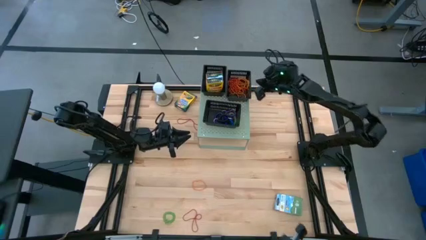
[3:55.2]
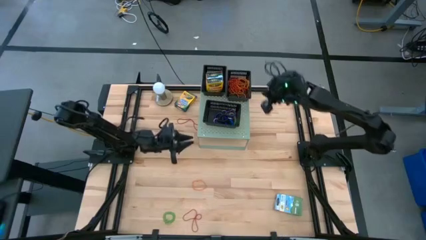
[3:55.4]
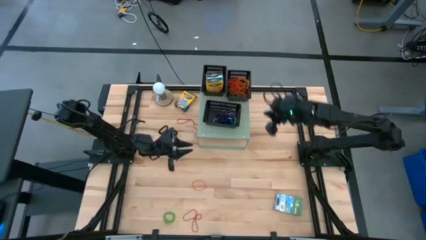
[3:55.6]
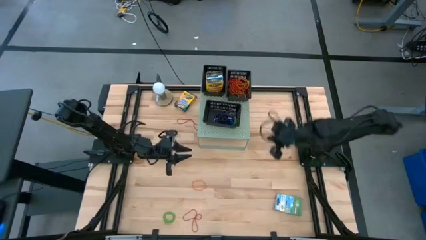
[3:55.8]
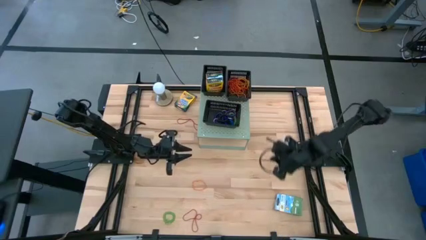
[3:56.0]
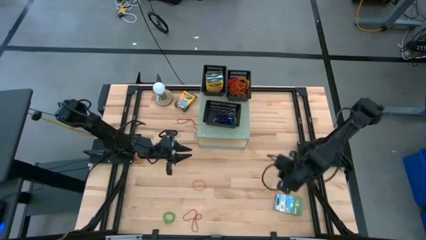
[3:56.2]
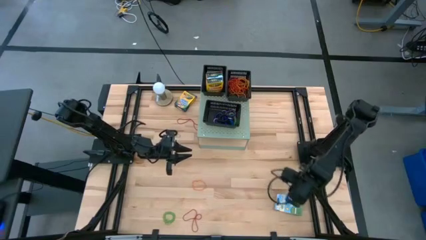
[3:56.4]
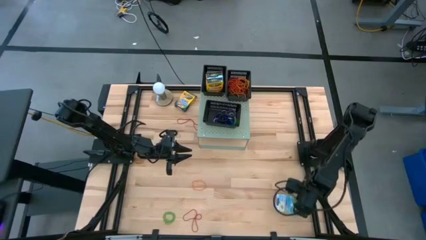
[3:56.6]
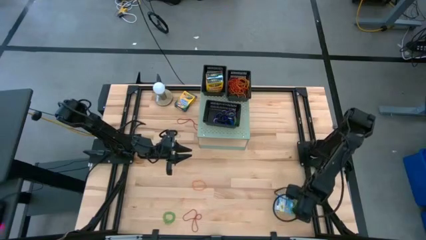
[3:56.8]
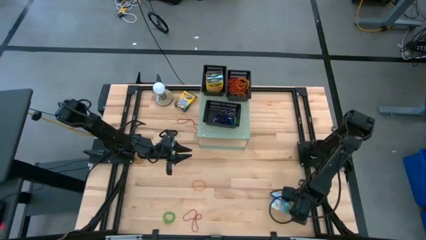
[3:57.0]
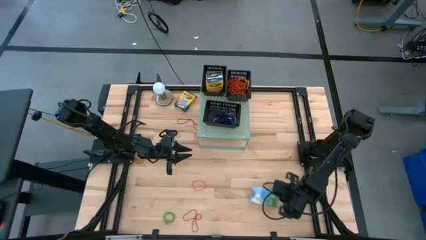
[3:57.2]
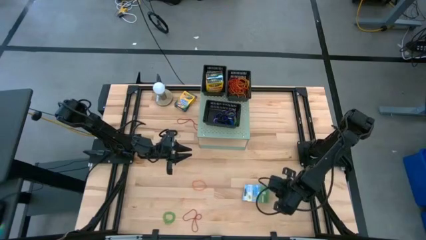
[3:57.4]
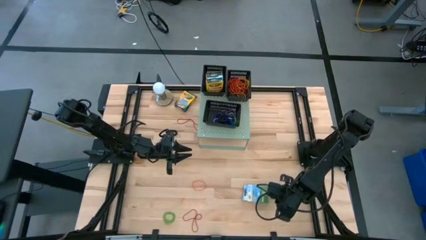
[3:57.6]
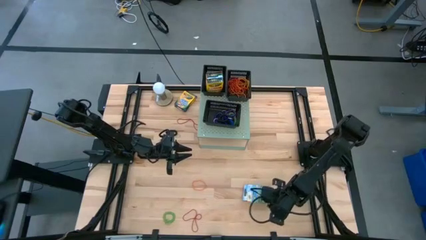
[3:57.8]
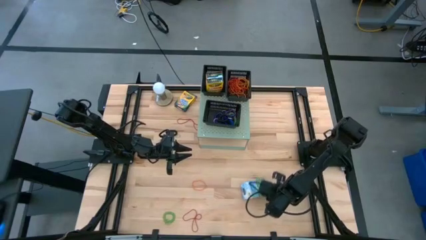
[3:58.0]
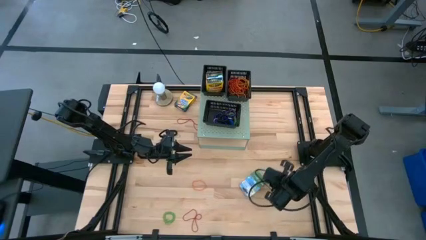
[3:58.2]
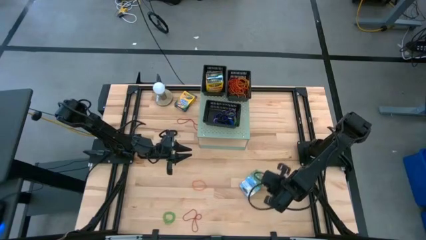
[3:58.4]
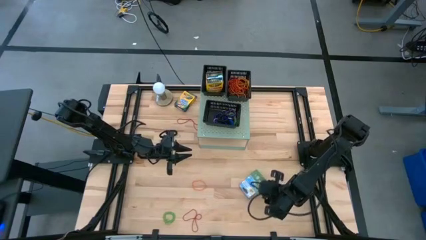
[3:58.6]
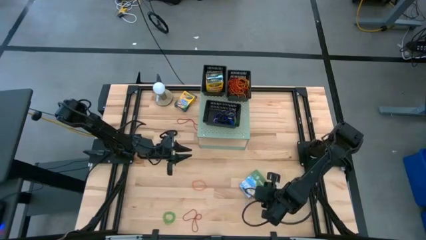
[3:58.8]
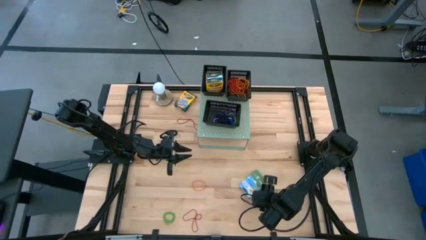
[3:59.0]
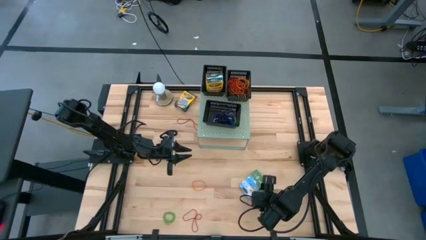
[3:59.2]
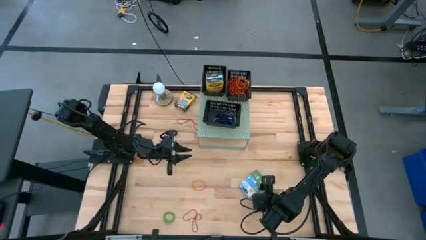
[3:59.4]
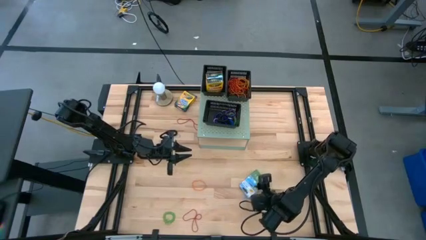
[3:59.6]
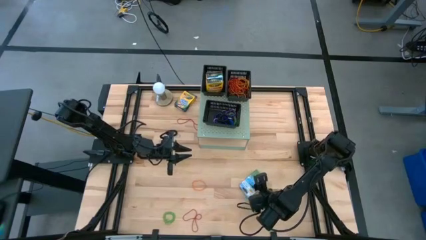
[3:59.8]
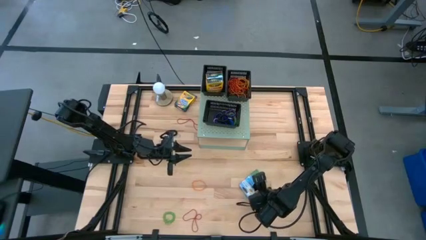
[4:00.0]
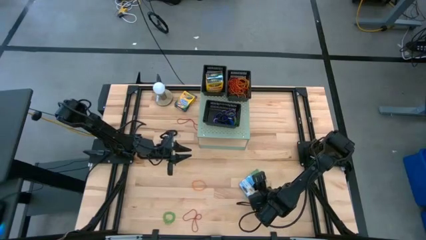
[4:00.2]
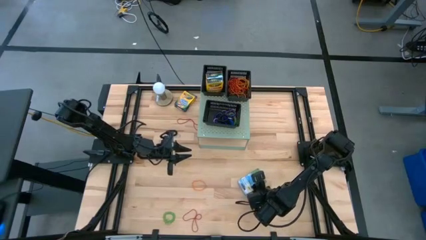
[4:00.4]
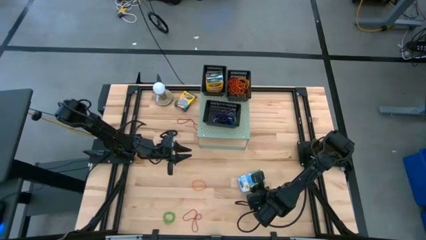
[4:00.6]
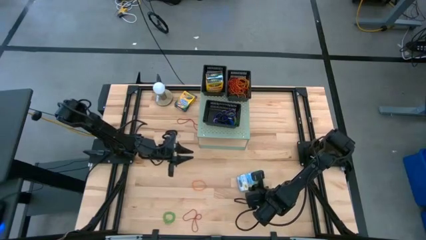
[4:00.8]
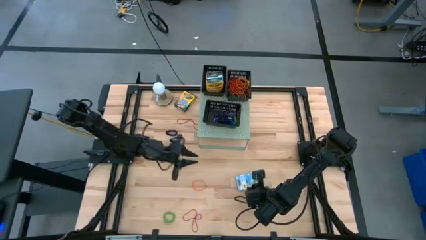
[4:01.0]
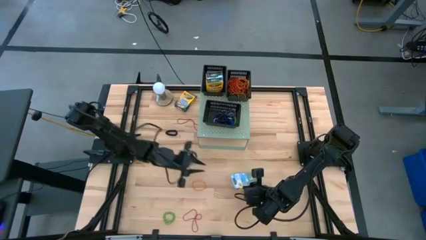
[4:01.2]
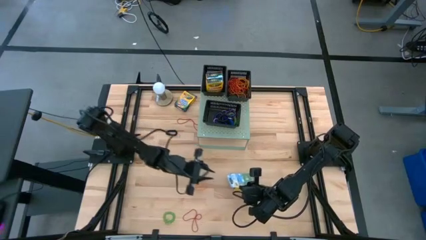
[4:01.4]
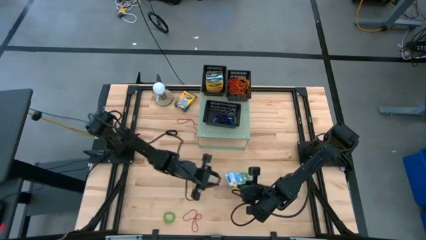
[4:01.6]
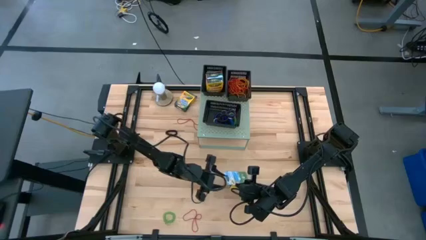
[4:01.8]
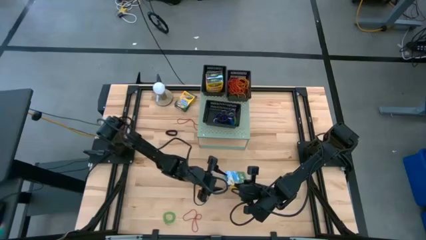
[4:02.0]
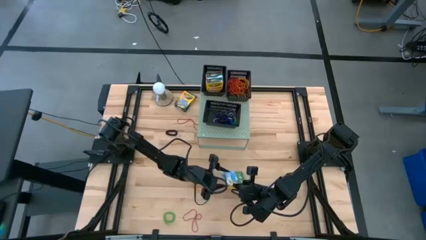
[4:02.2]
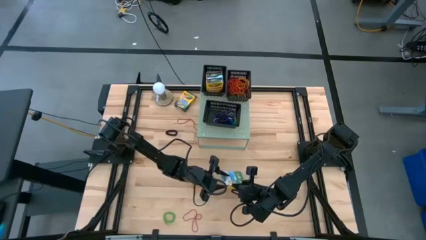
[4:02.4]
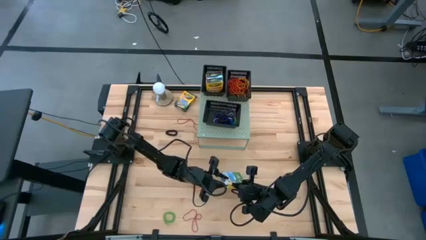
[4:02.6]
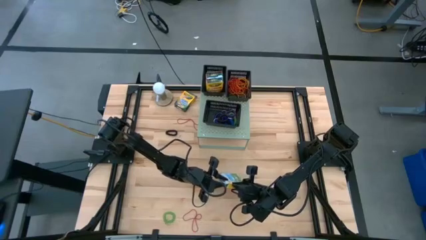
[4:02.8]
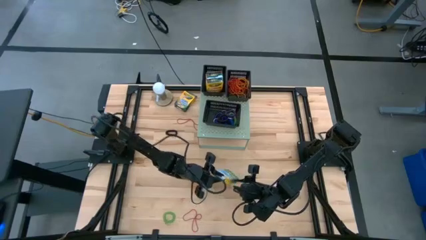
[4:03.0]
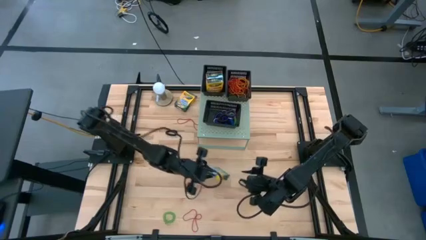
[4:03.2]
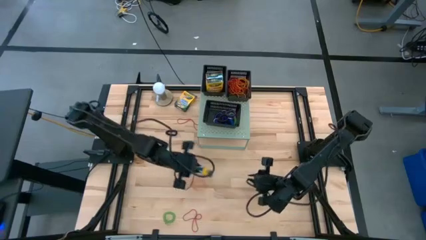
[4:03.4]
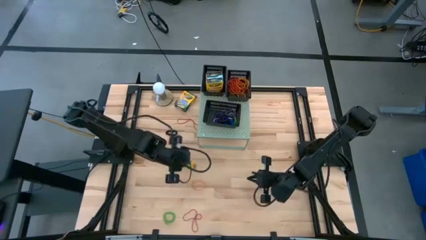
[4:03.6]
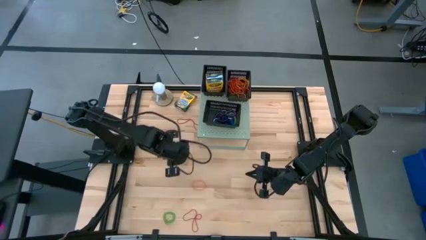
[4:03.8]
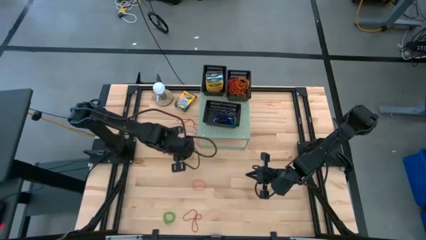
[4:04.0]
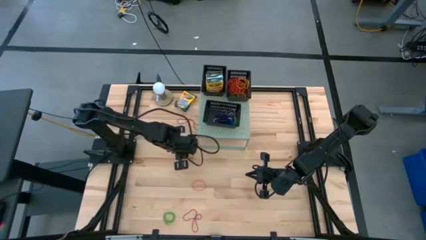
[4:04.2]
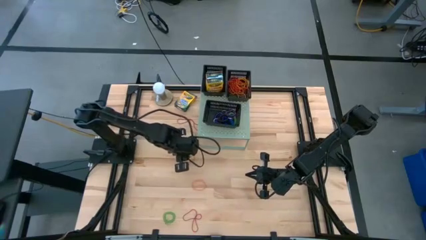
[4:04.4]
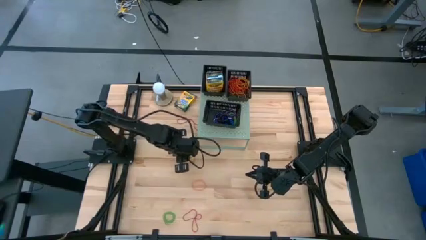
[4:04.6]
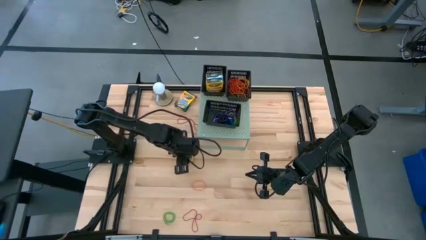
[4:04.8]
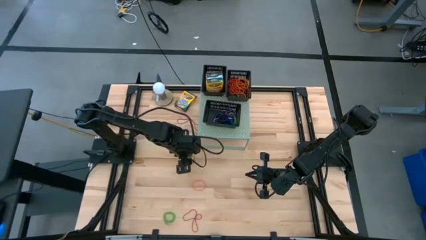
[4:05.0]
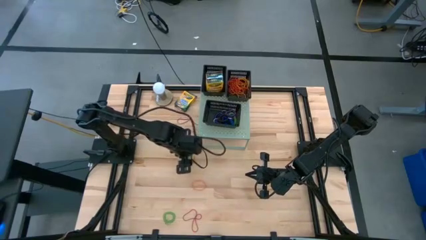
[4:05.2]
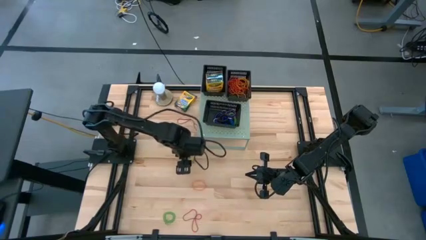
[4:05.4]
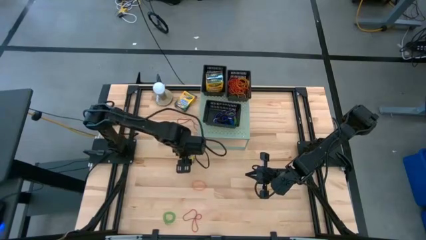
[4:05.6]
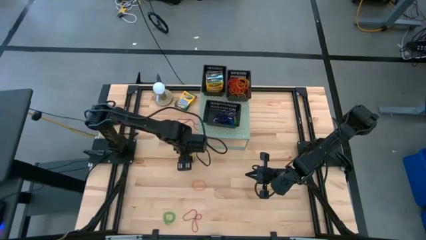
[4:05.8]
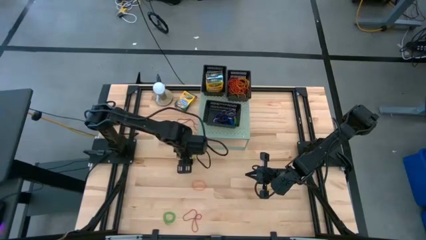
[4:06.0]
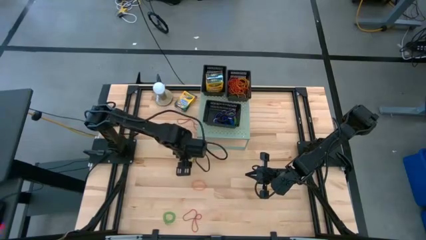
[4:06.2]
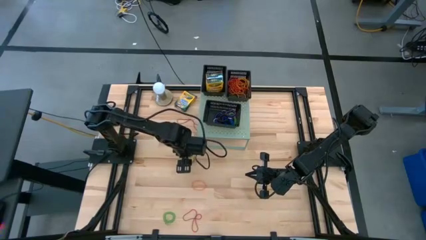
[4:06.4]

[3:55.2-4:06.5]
Task: Pick & Place Office Desk Supplies
Put the yellow crayon box into the top left black bin on the shelf

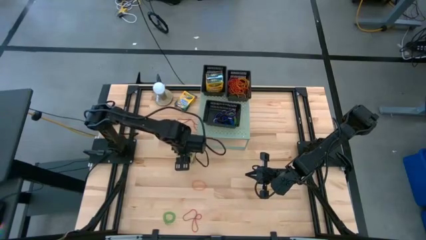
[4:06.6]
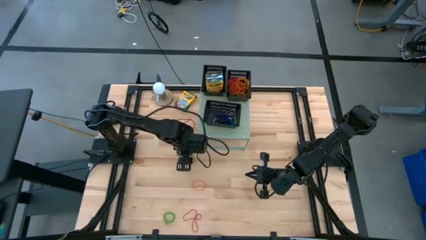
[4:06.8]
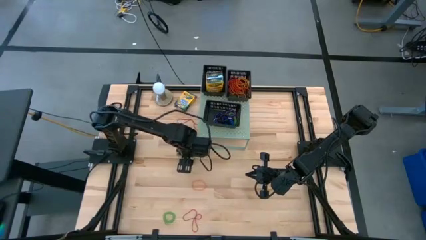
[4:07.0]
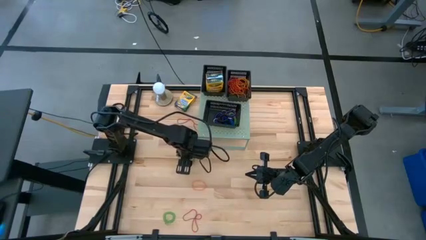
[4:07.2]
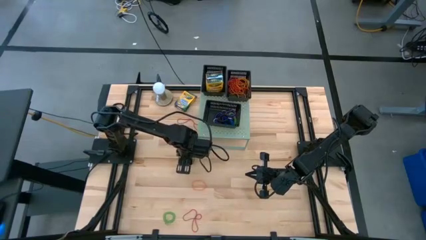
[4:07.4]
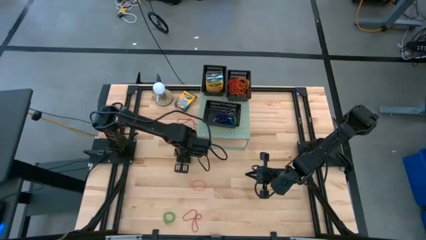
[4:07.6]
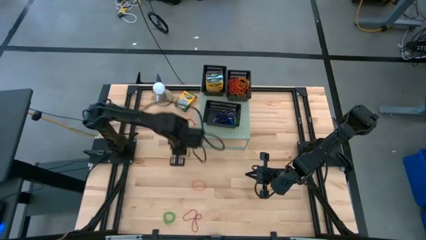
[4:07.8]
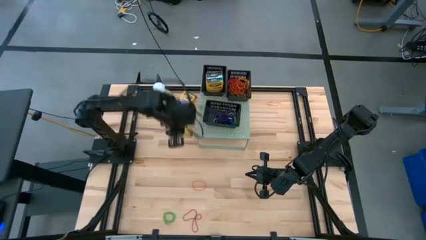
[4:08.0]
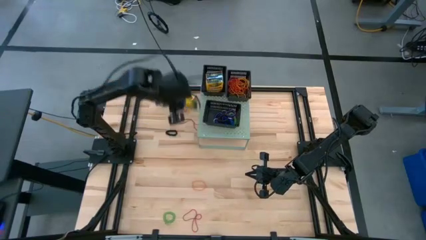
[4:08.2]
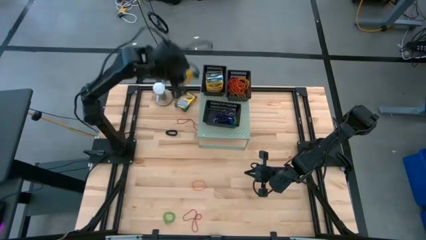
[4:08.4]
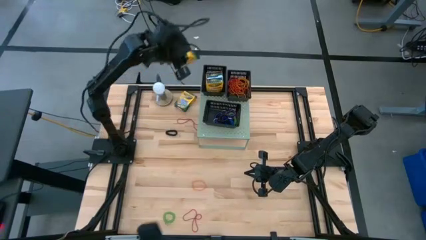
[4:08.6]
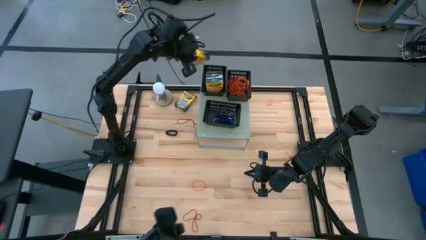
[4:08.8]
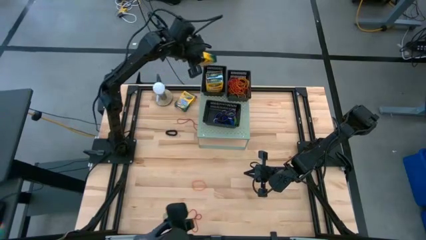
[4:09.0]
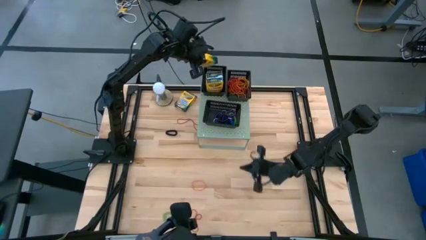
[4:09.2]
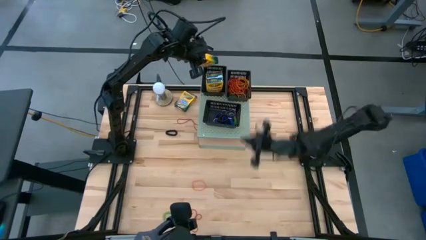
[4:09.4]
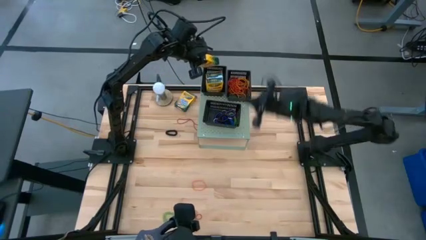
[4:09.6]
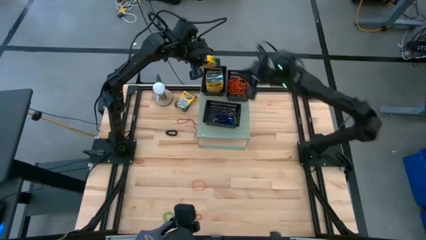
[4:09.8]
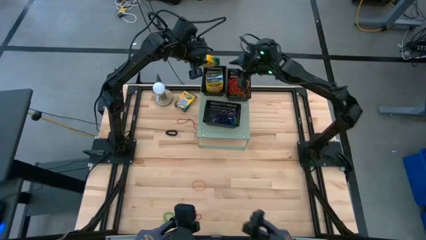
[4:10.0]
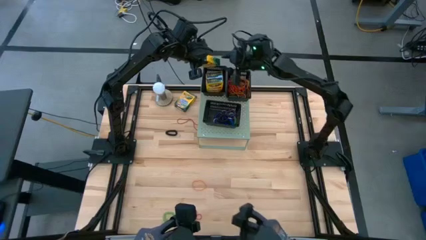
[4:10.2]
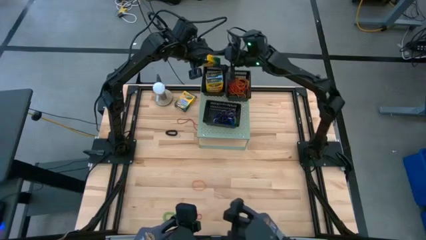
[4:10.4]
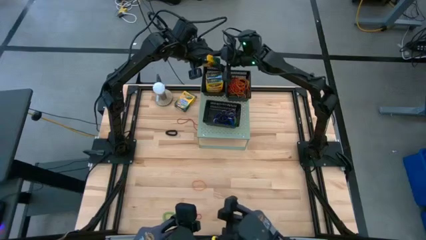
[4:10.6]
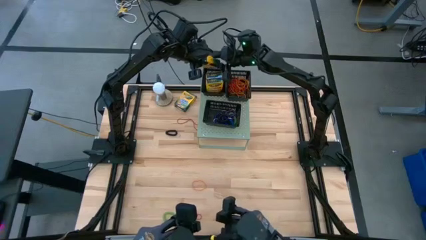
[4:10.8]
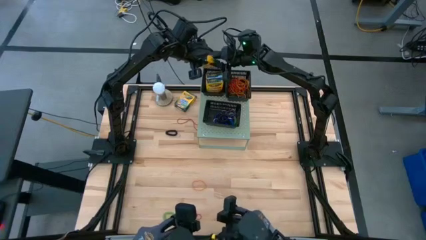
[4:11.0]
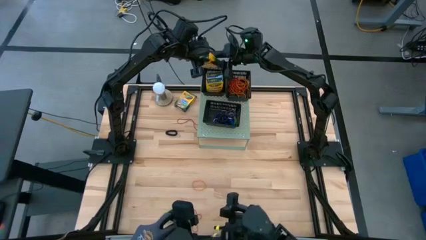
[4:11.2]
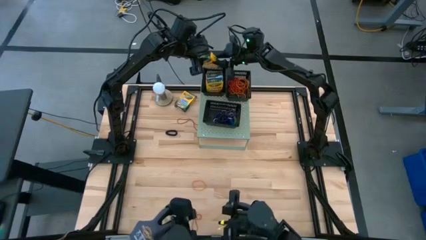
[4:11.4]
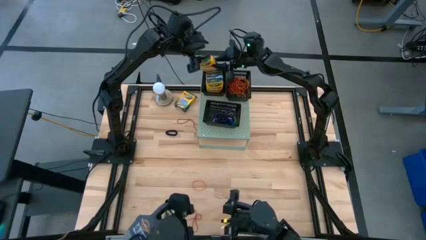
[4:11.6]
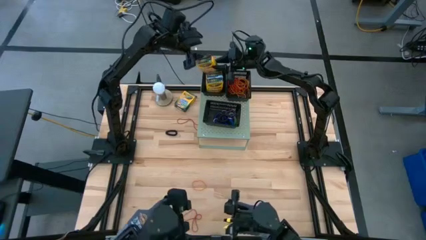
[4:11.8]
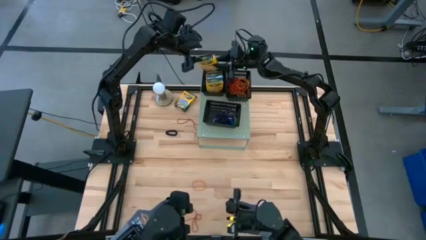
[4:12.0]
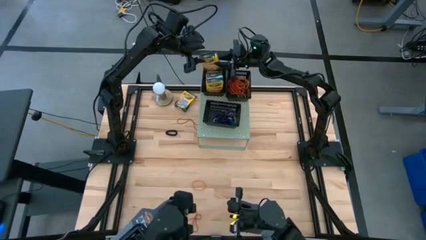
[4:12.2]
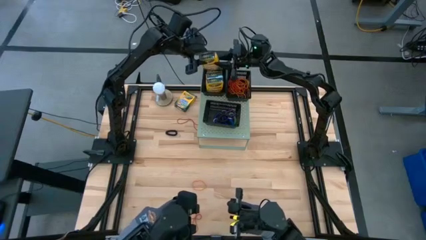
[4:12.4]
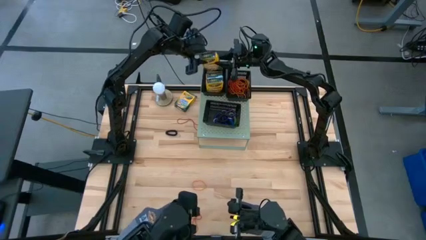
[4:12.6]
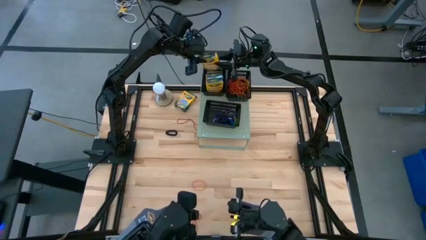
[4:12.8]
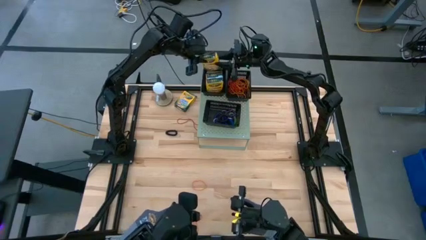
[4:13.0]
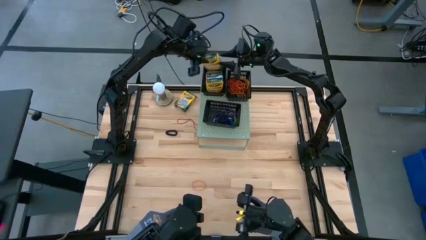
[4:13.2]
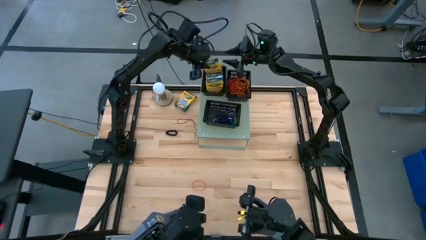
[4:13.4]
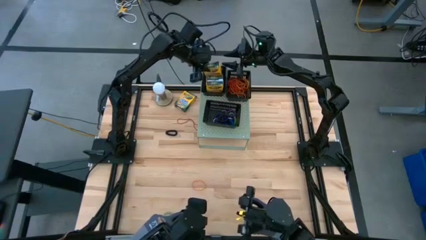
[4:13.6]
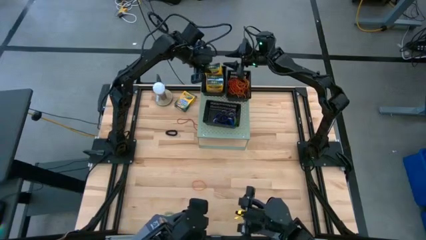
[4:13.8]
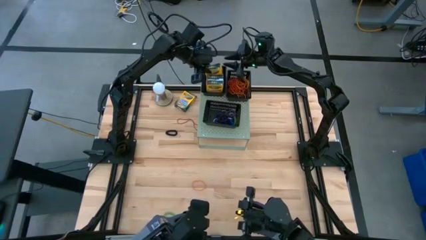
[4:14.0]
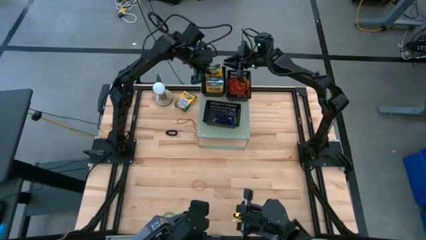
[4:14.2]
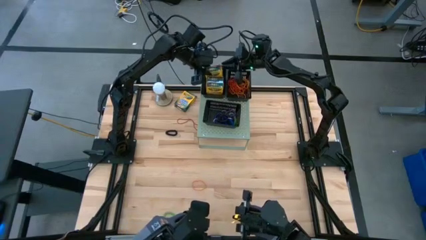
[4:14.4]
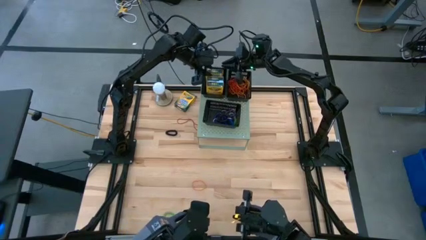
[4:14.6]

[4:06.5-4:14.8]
Put the yellow crayon box into the top left black bin on the shelf
